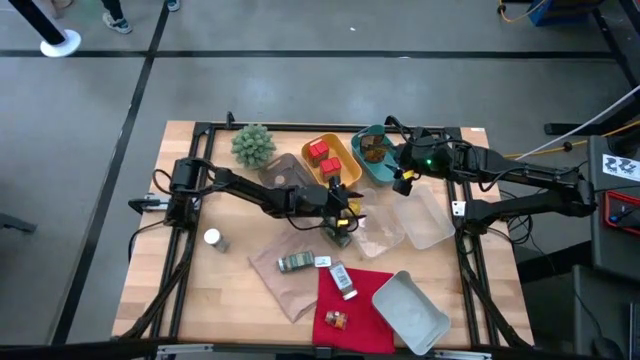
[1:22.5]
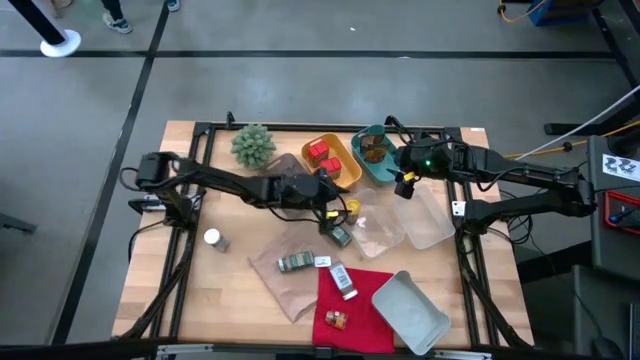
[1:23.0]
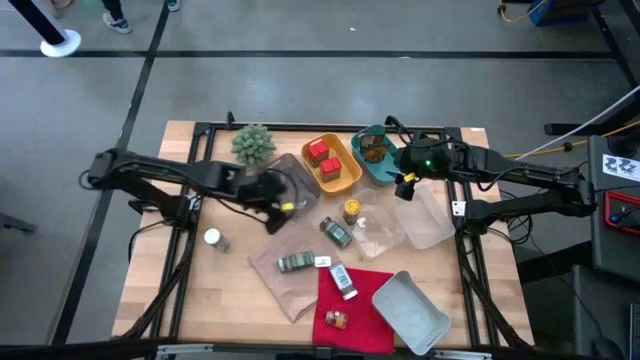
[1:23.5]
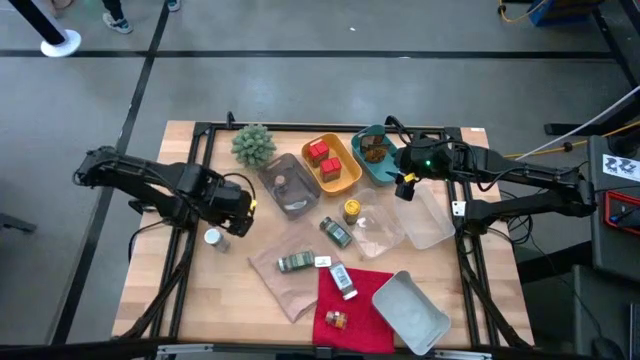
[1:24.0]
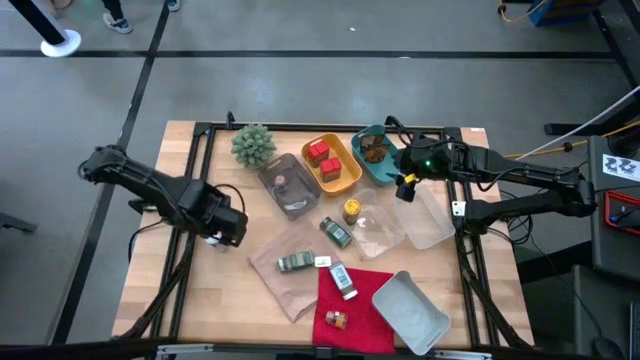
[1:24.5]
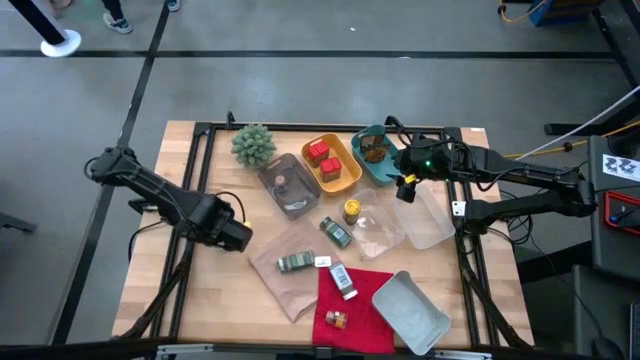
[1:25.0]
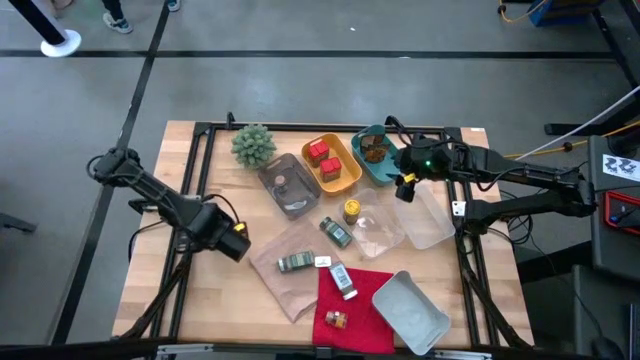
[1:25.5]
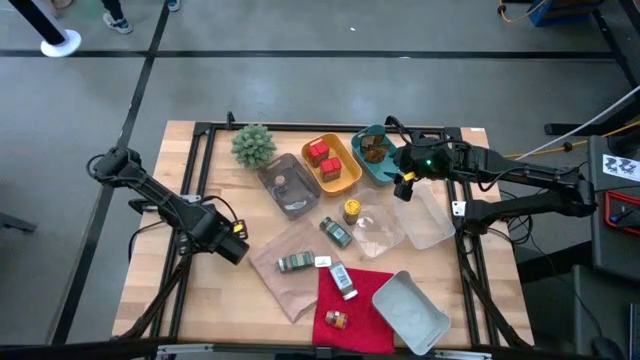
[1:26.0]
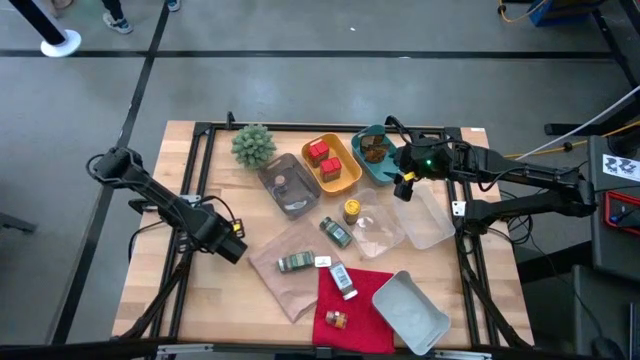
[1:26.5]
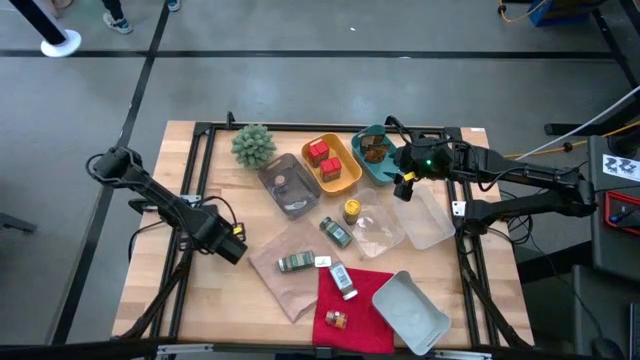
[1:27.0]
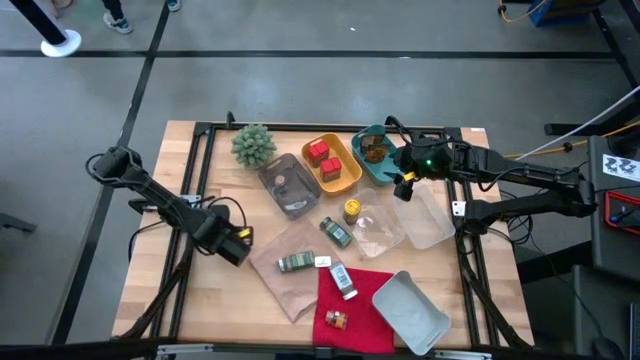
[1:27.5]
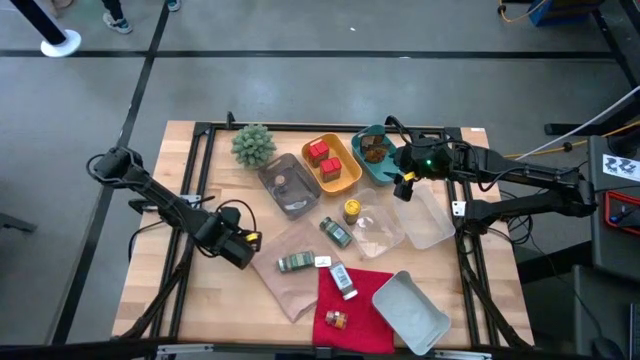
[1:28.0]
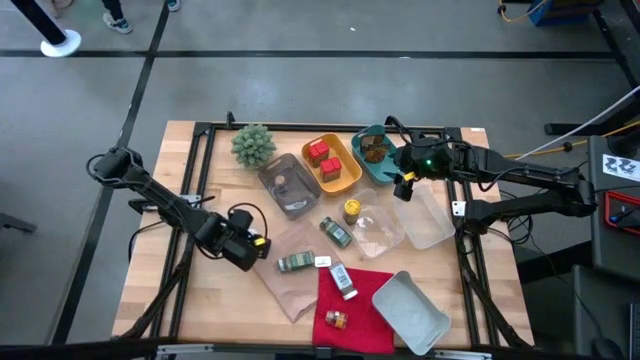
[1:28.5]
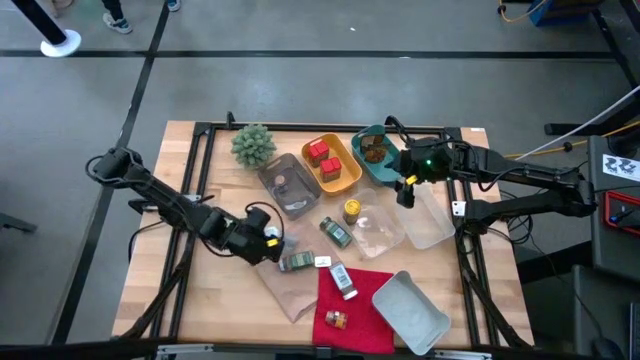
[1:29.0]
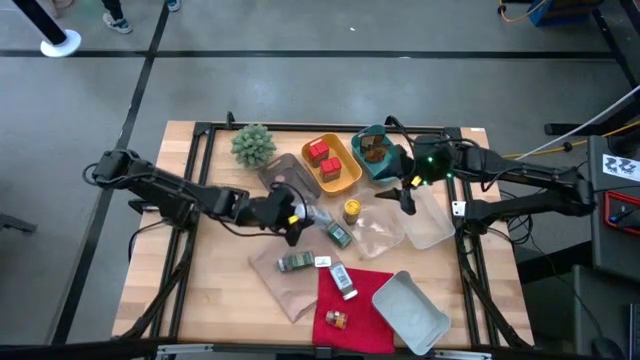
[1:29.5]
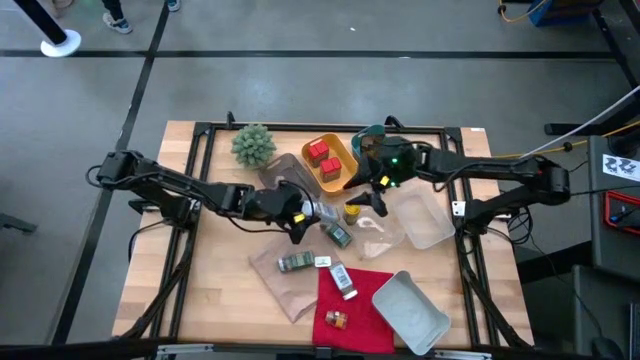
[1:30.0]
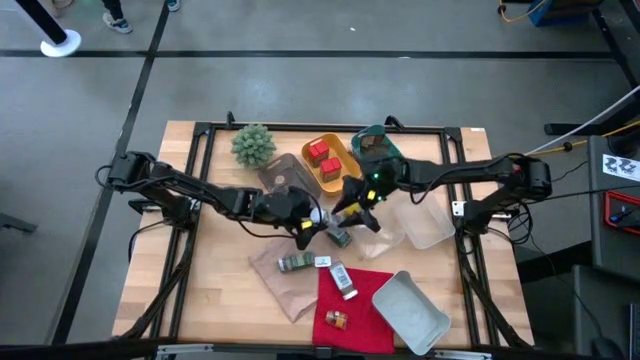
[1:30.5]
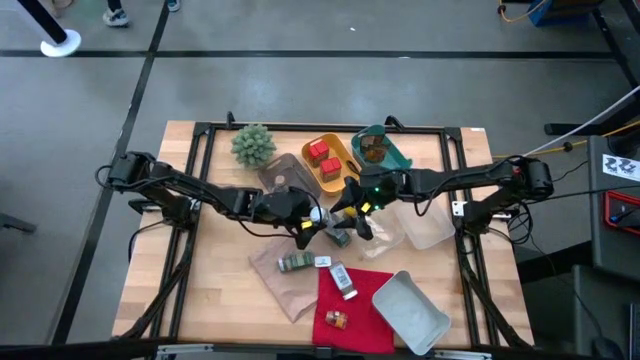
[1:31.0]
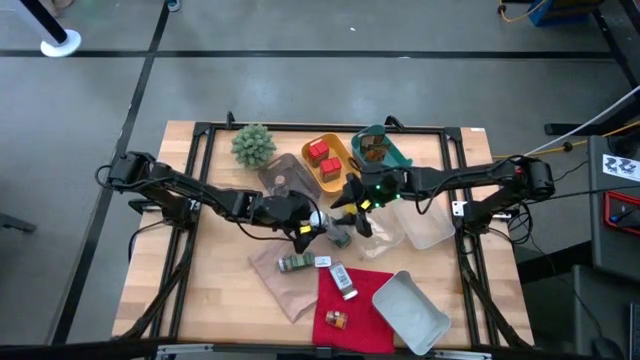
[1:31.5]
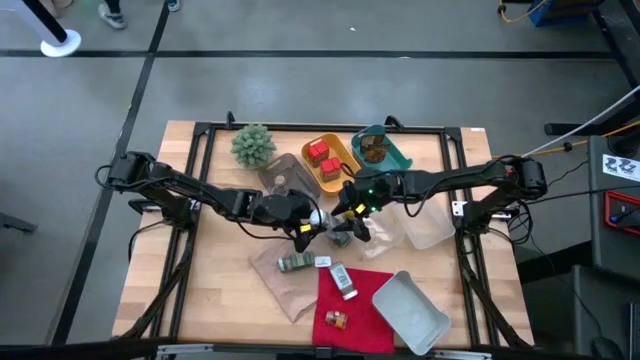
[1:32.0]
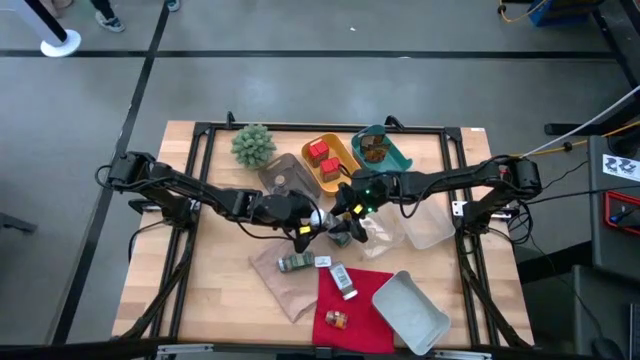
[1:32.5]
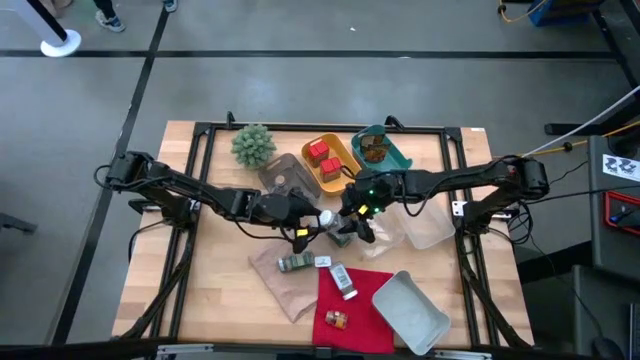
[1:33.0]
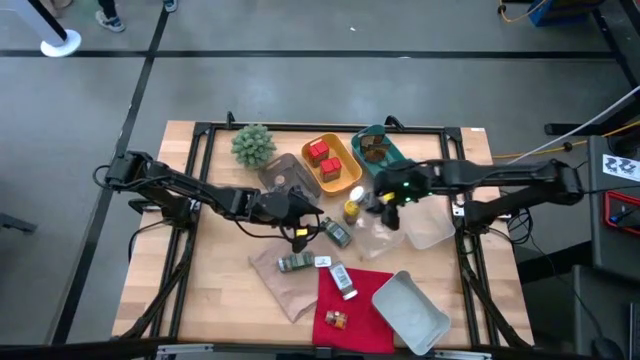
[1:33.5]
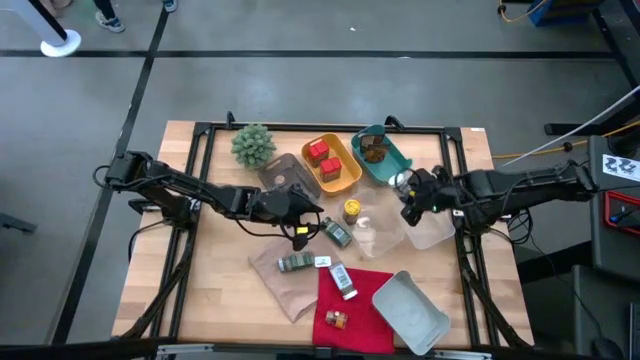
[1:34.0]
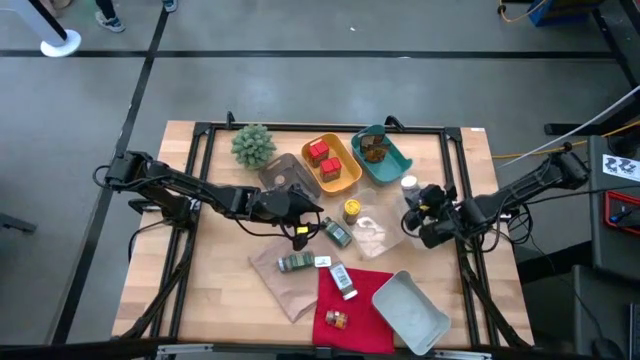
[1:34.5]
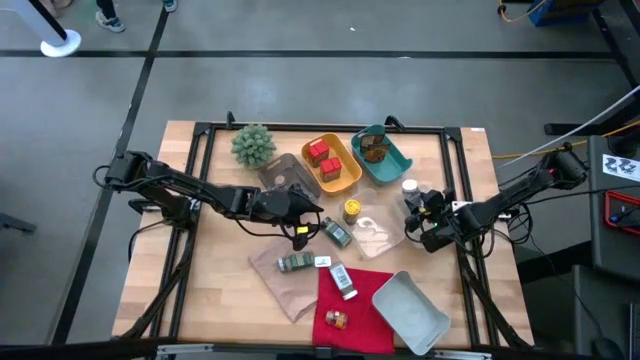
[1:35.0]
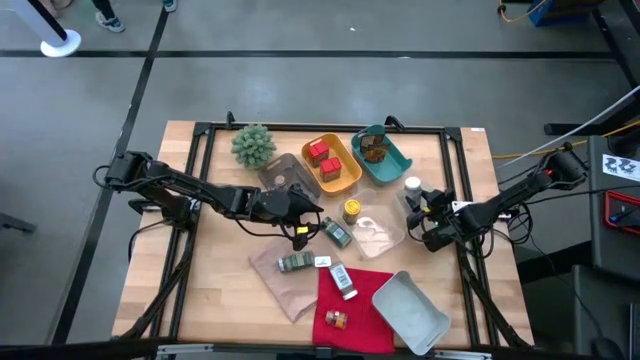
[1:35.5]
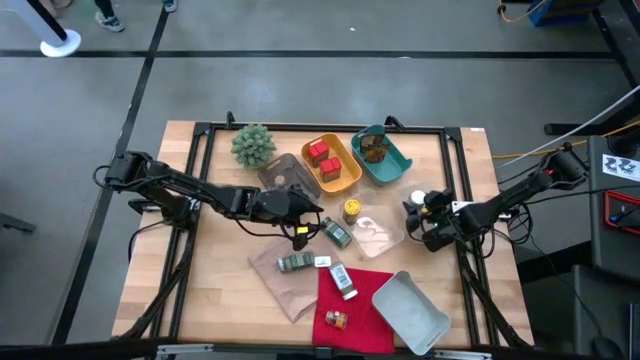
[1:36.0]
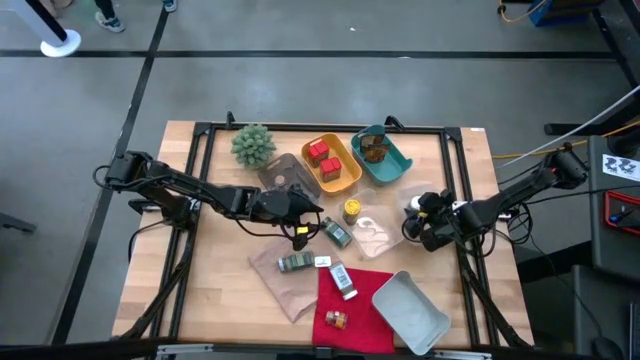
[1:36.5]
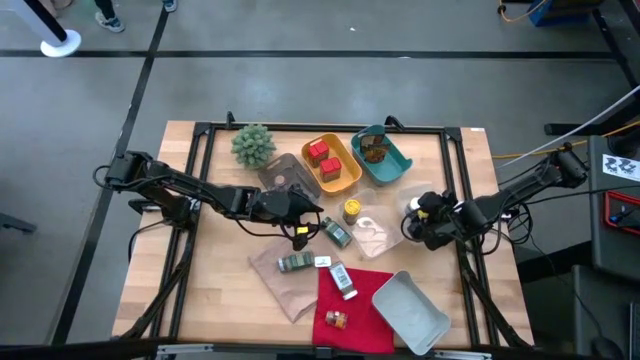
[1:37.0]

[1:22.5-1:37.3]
Task: Sort spices by type
Put the left white seasoning bottle into the right transparent bin

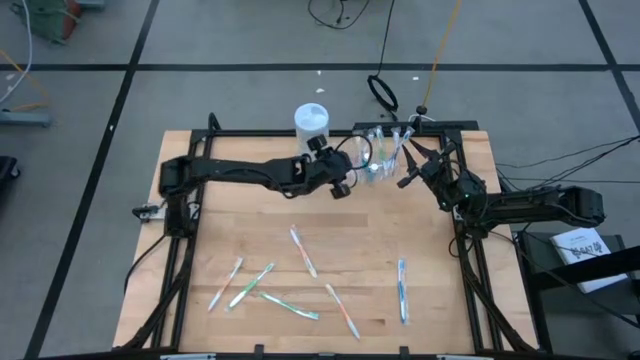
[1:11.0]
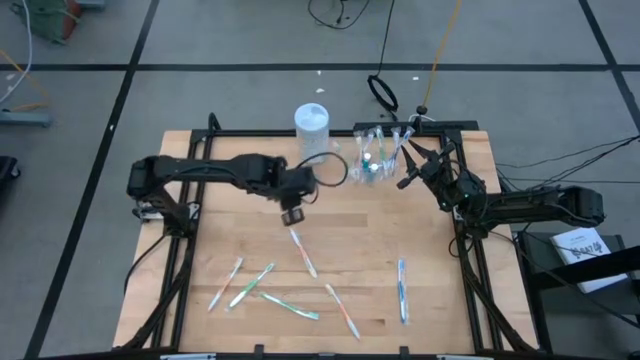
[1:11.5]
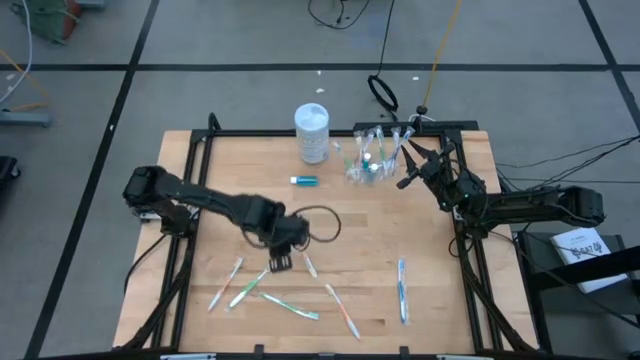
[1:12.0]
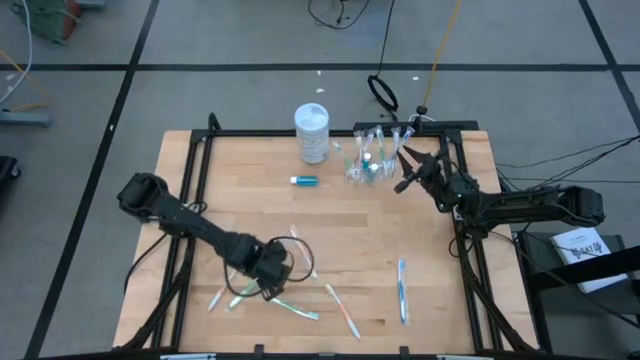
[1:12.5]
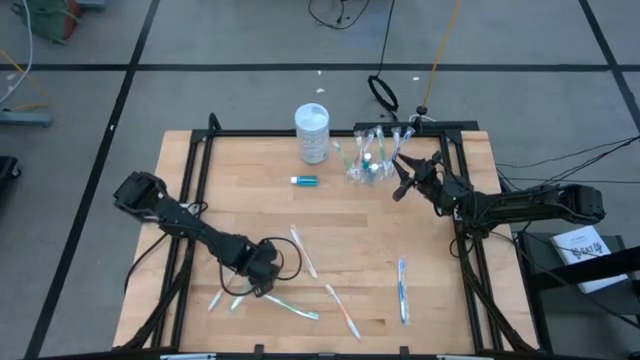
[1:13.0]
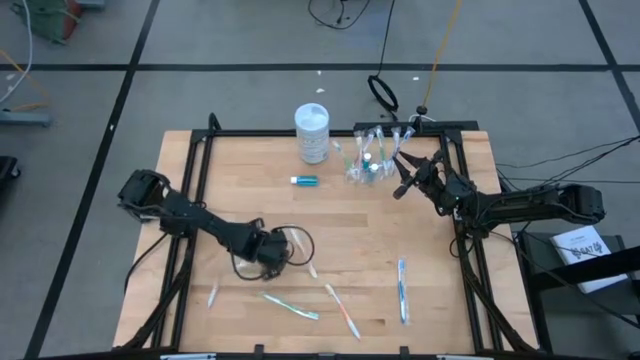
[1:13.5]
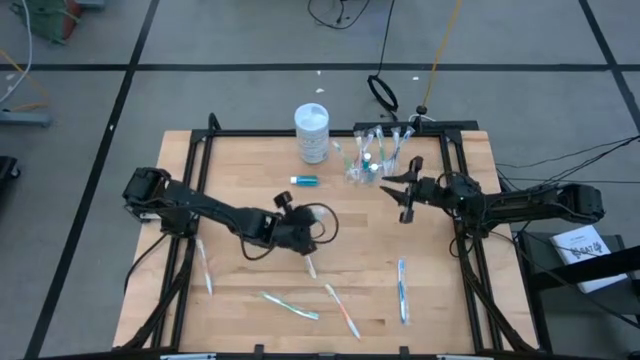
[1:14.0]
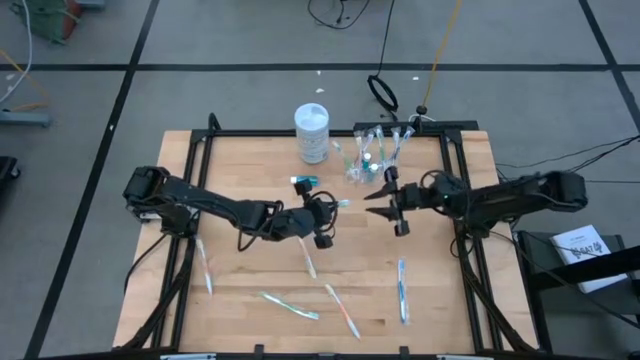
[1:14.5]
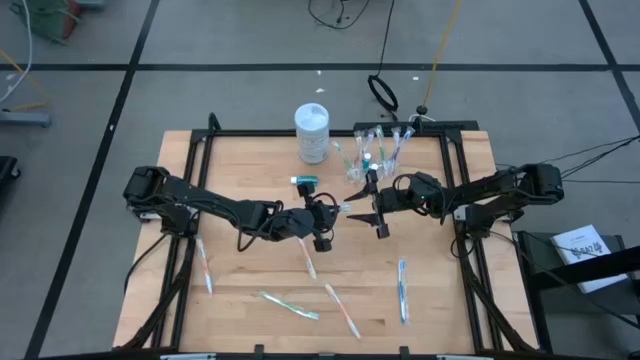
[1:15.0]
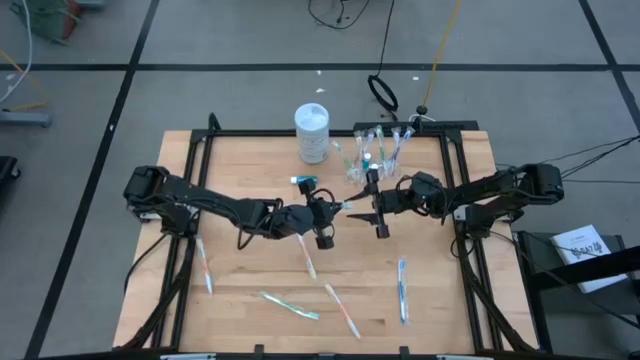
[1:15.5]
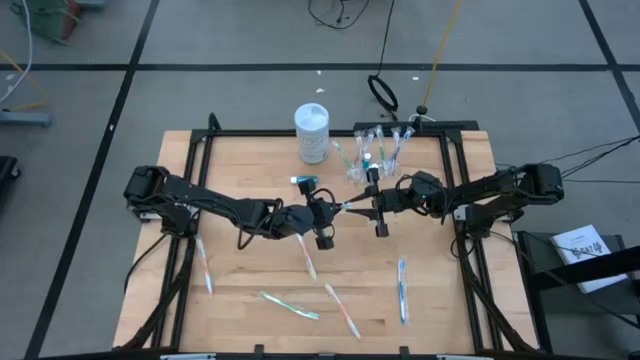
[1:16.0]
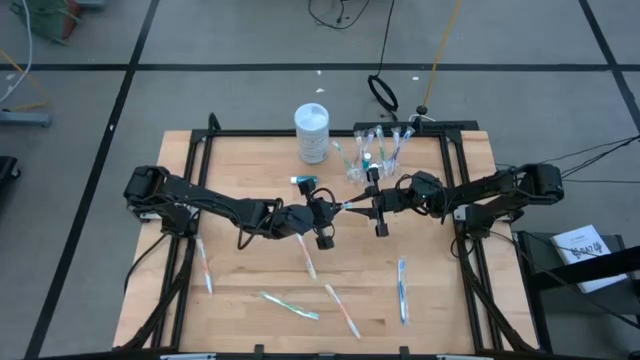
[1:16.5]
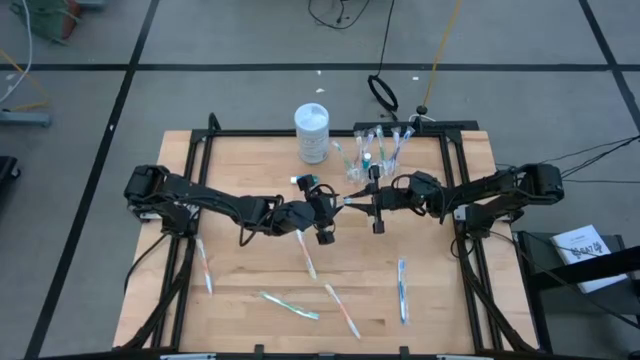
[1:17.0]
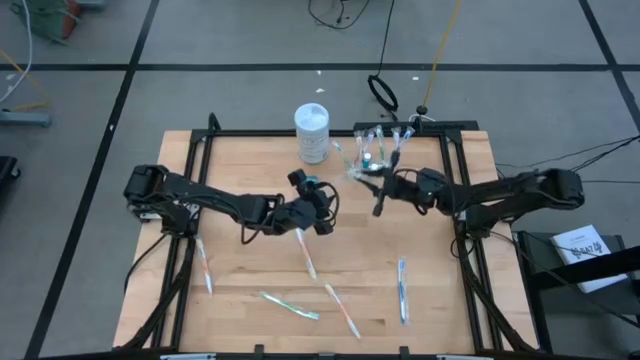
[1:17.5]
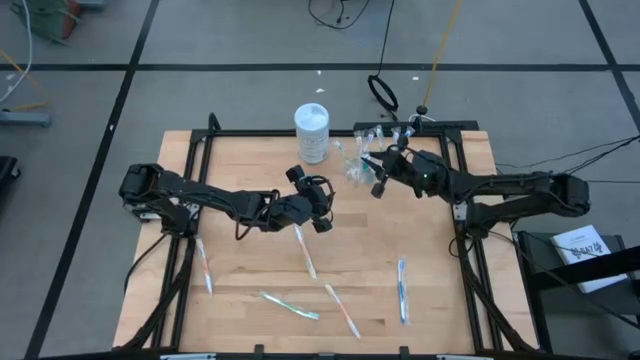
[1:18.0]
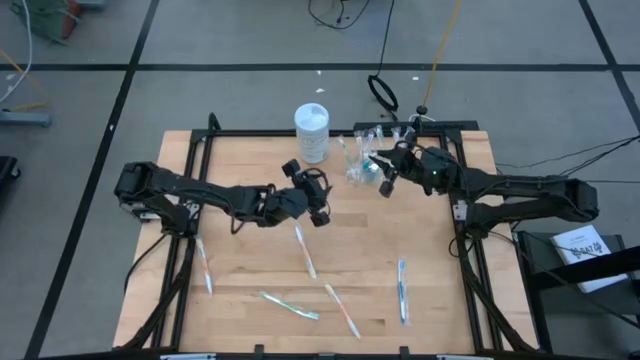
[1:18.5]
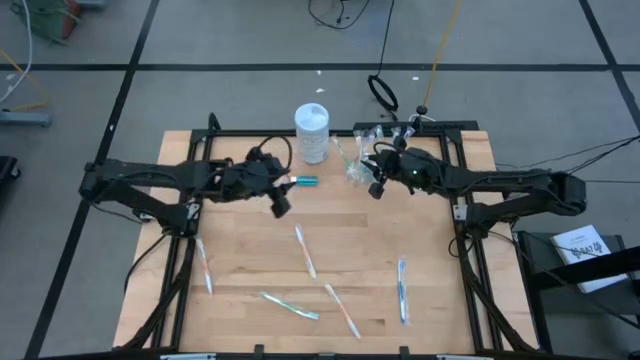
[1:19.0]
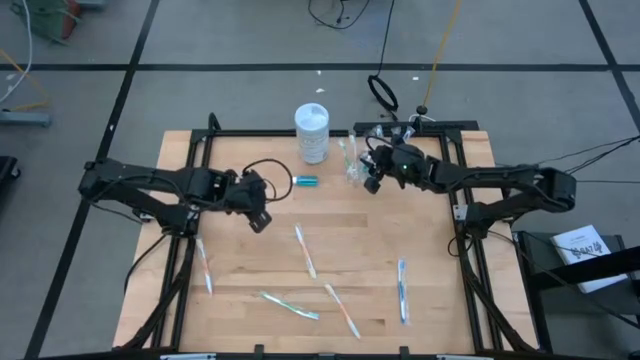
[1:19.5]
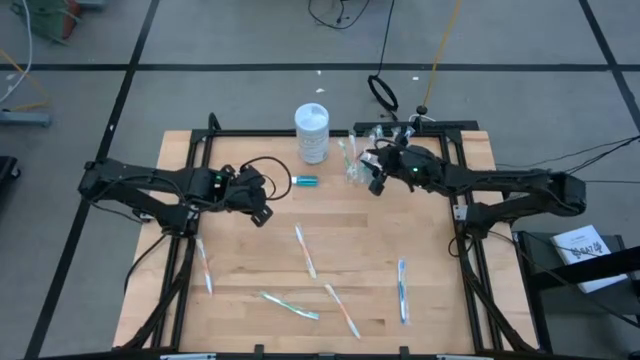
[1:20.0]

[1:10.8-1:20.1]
Task: Pick & Place toothbrushing station
Put the green toothbrush into the transparent organizer
